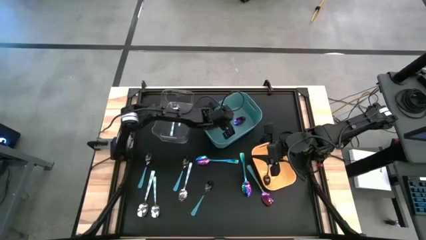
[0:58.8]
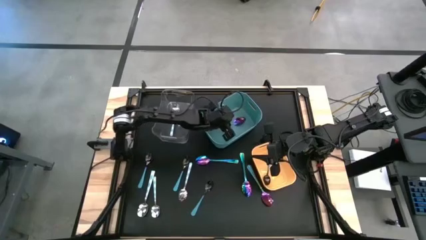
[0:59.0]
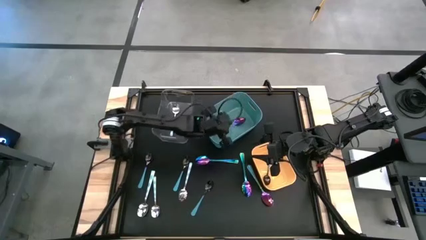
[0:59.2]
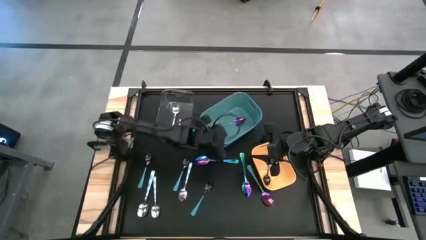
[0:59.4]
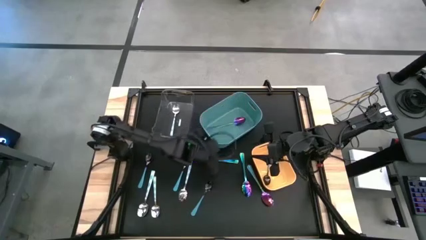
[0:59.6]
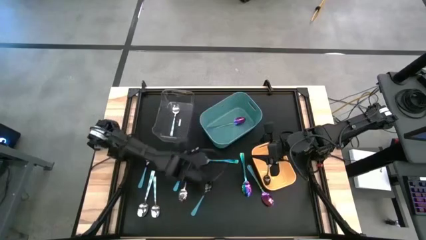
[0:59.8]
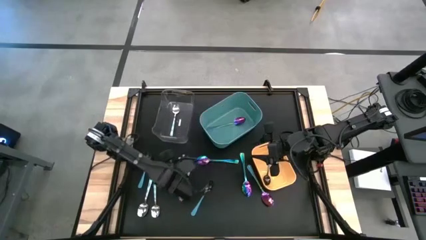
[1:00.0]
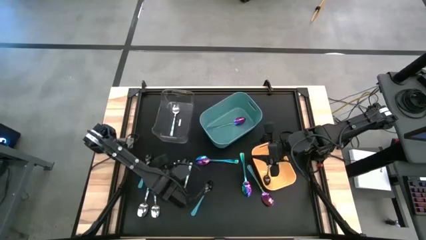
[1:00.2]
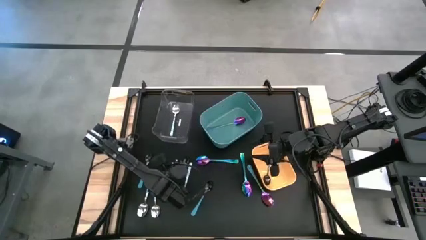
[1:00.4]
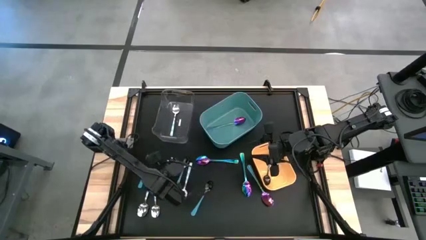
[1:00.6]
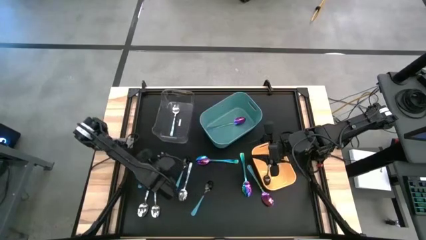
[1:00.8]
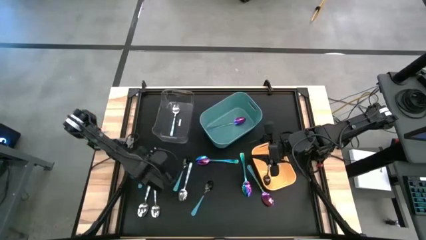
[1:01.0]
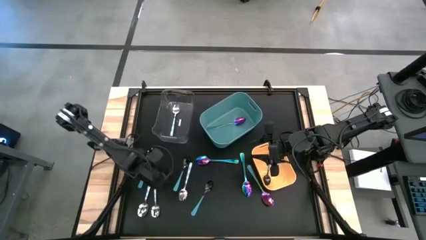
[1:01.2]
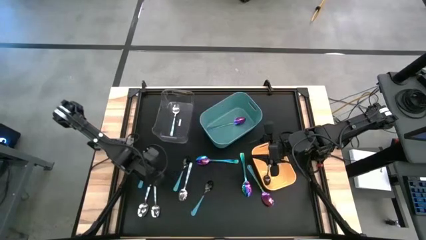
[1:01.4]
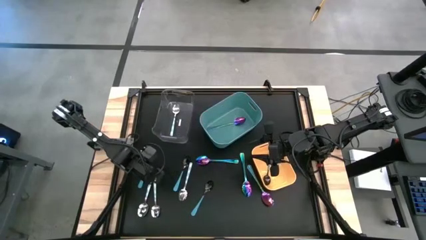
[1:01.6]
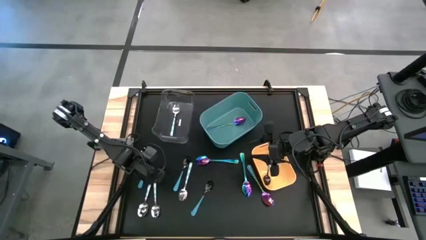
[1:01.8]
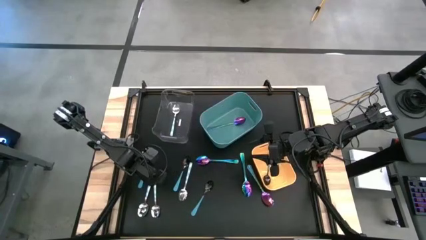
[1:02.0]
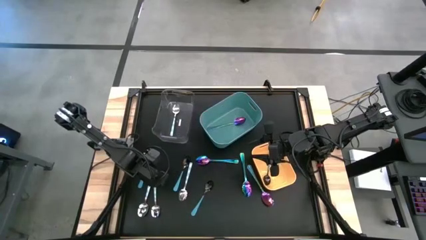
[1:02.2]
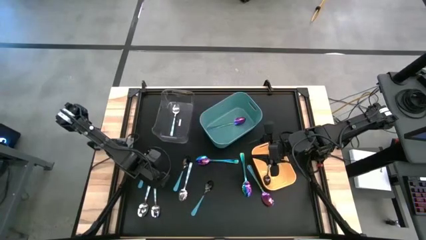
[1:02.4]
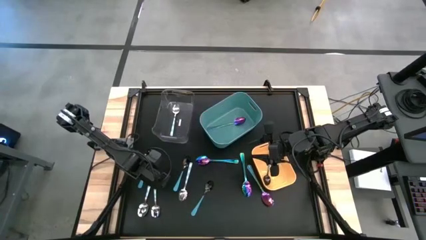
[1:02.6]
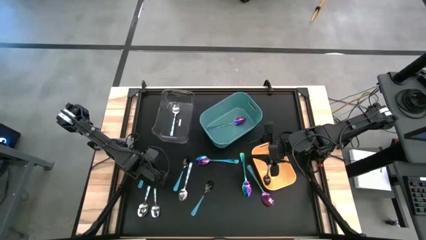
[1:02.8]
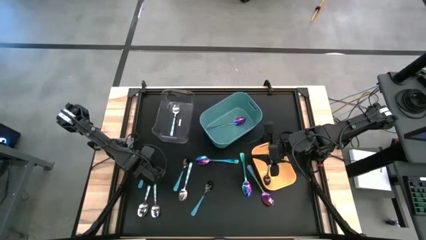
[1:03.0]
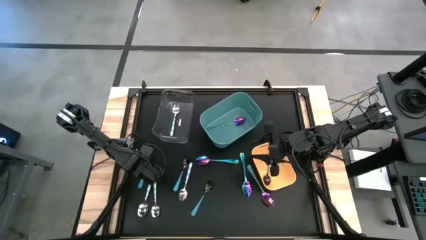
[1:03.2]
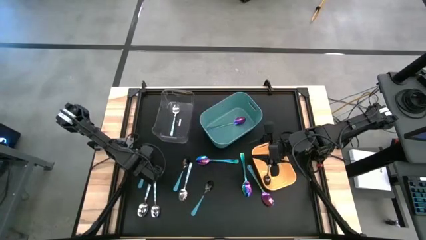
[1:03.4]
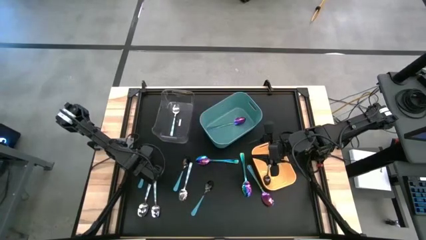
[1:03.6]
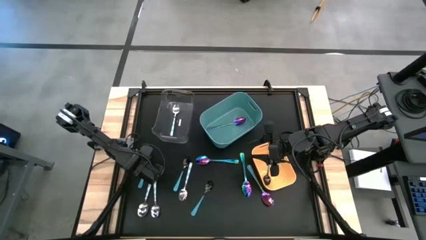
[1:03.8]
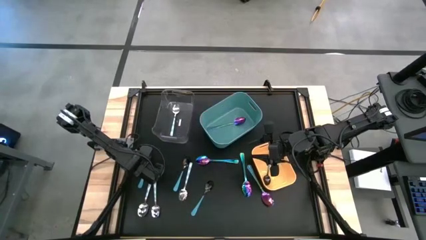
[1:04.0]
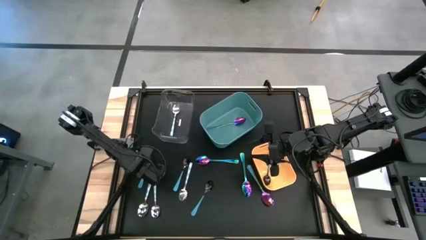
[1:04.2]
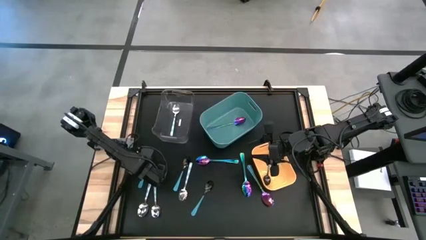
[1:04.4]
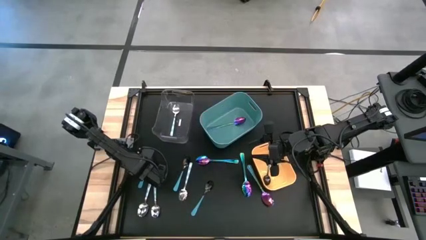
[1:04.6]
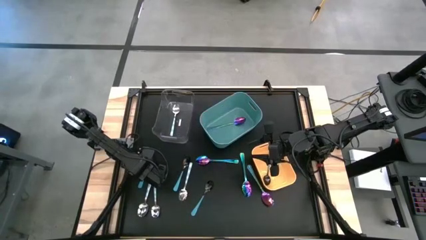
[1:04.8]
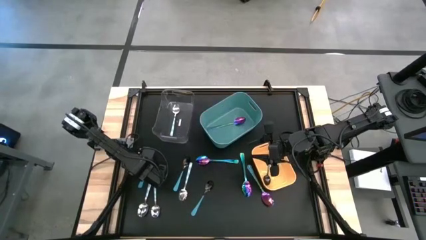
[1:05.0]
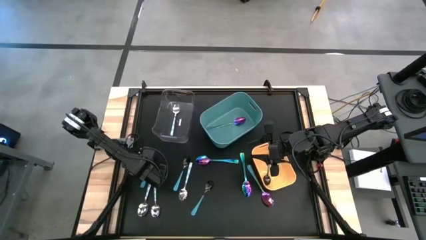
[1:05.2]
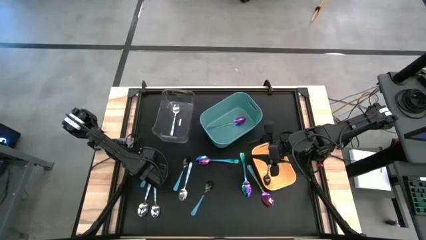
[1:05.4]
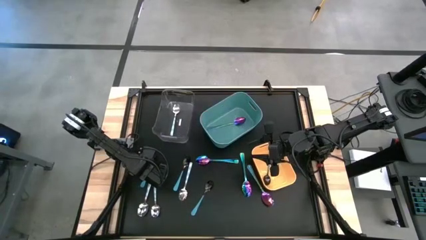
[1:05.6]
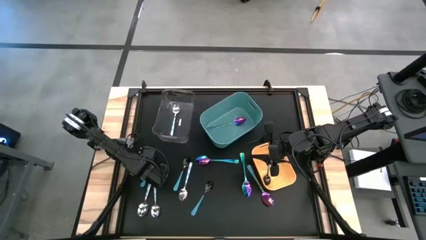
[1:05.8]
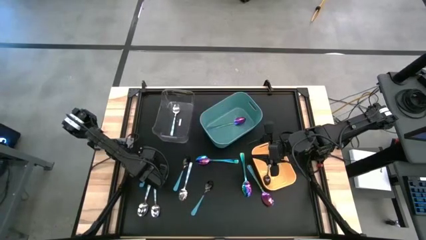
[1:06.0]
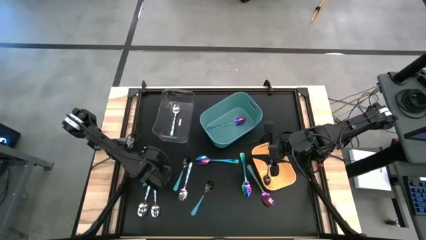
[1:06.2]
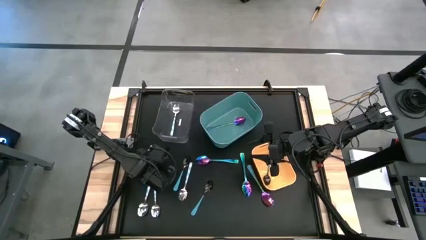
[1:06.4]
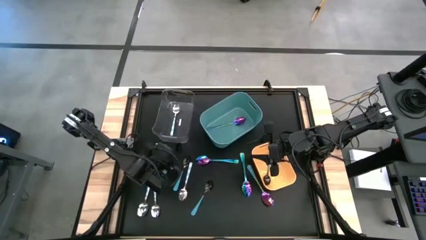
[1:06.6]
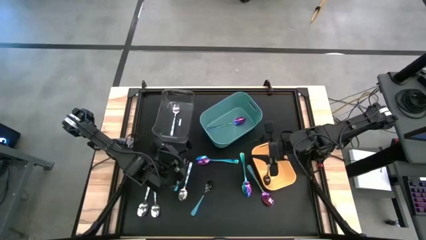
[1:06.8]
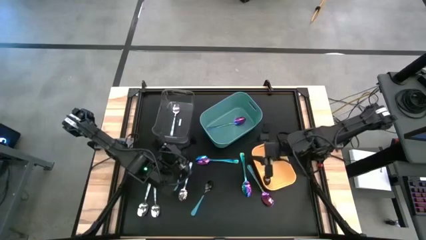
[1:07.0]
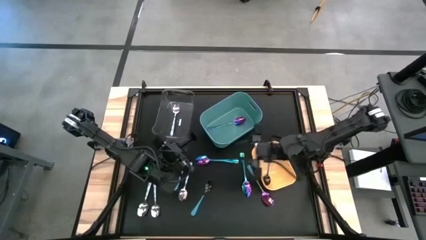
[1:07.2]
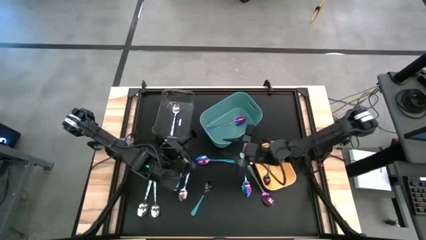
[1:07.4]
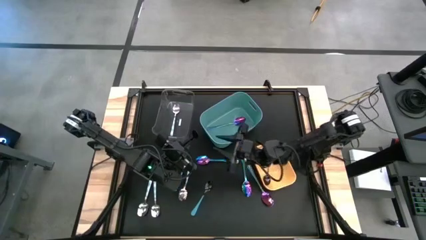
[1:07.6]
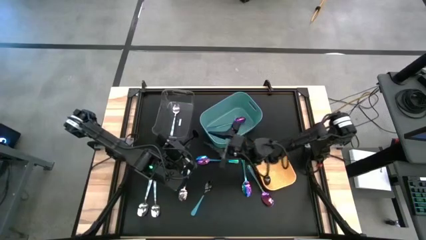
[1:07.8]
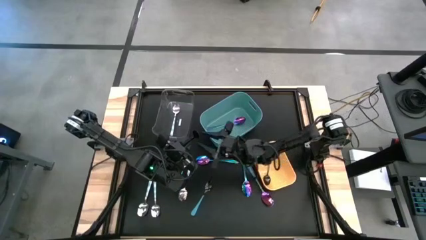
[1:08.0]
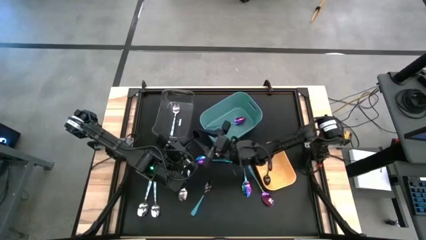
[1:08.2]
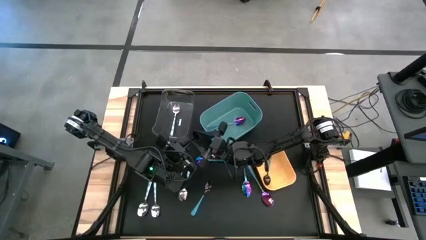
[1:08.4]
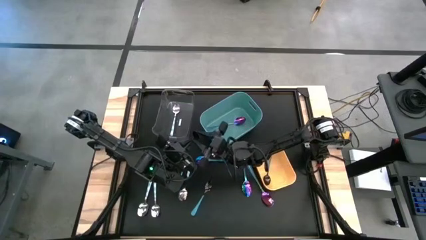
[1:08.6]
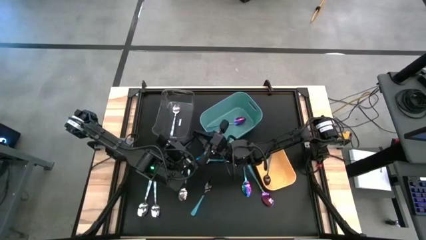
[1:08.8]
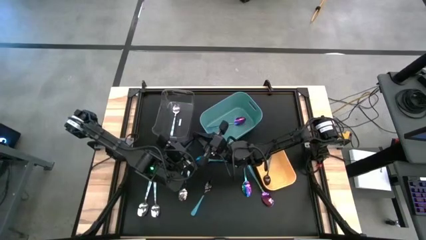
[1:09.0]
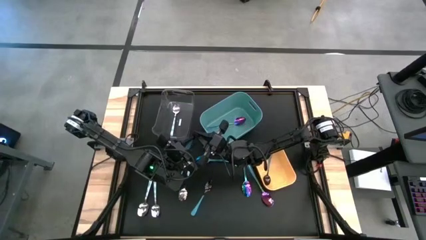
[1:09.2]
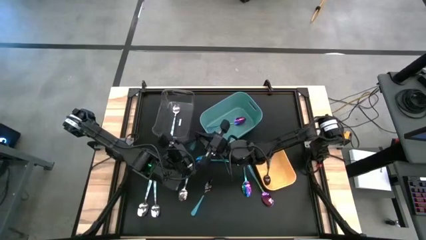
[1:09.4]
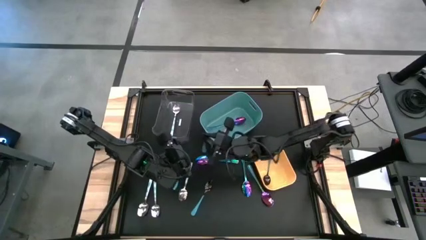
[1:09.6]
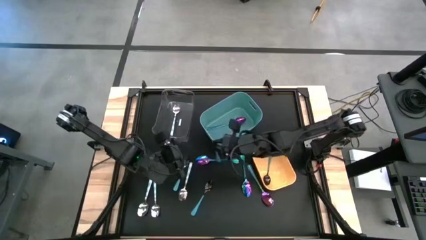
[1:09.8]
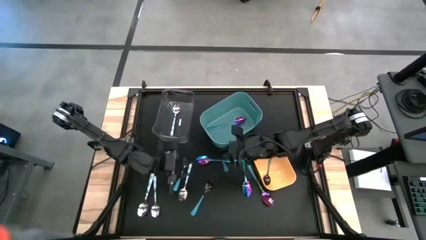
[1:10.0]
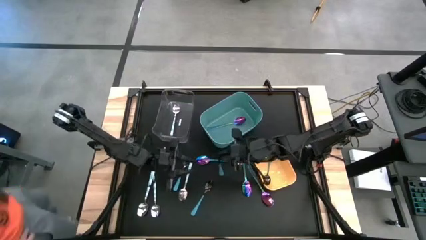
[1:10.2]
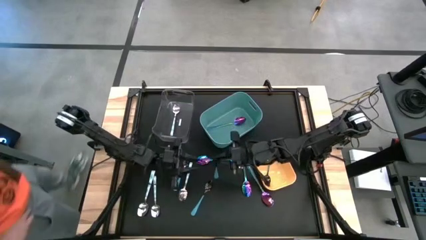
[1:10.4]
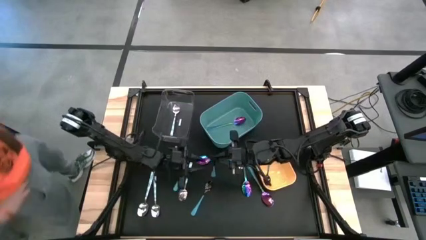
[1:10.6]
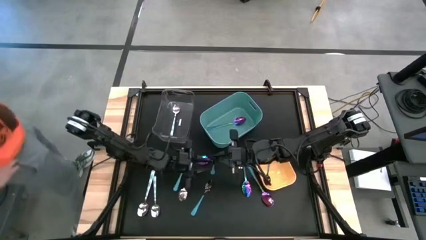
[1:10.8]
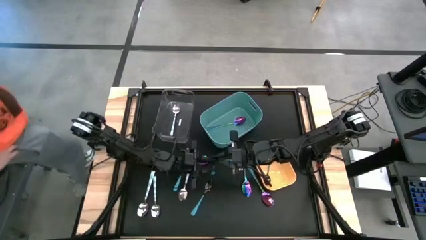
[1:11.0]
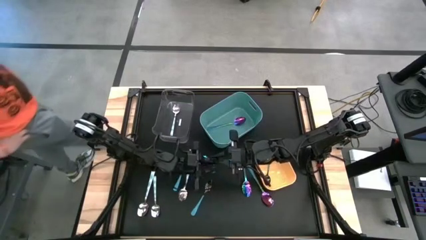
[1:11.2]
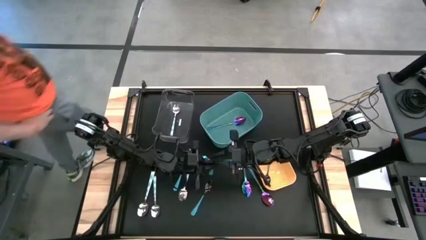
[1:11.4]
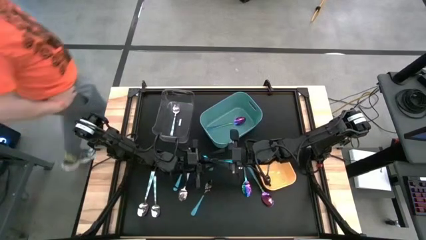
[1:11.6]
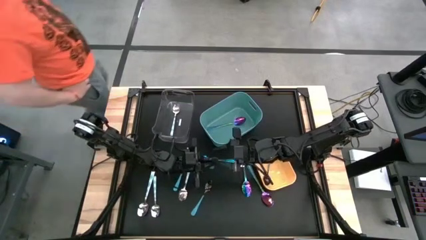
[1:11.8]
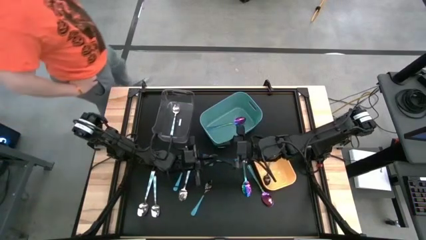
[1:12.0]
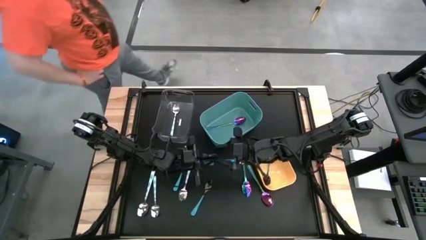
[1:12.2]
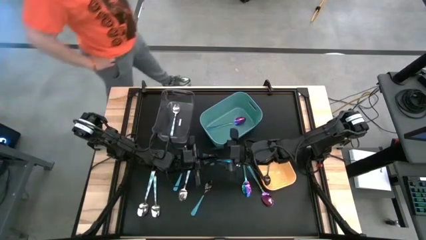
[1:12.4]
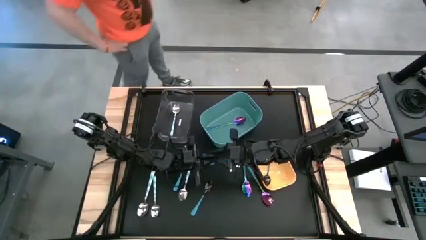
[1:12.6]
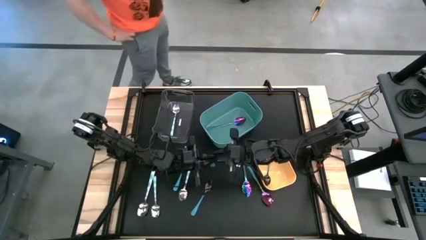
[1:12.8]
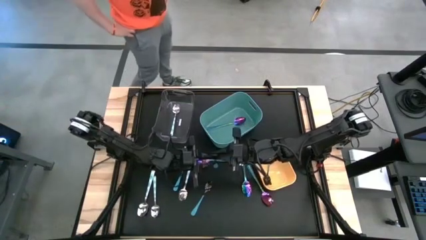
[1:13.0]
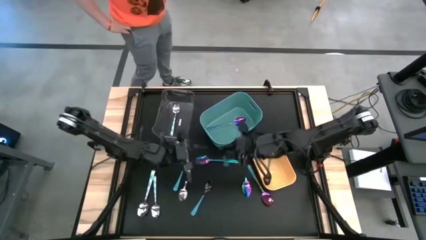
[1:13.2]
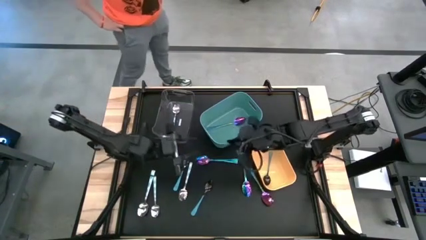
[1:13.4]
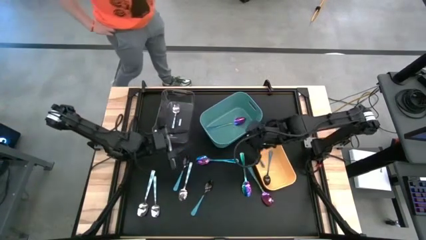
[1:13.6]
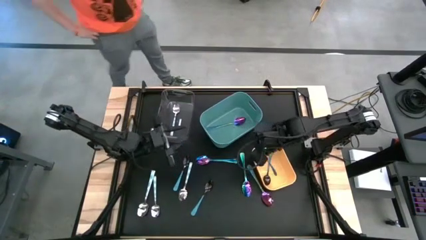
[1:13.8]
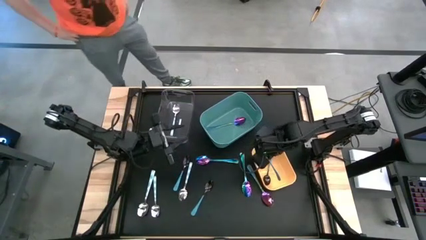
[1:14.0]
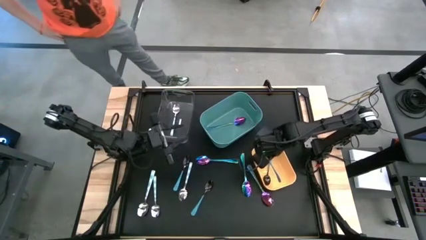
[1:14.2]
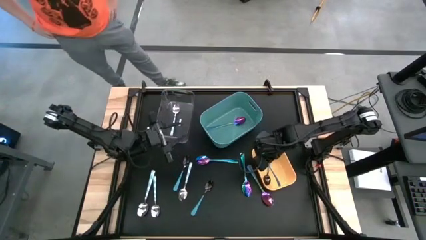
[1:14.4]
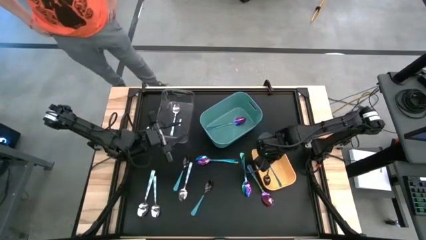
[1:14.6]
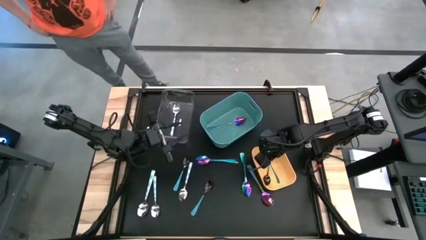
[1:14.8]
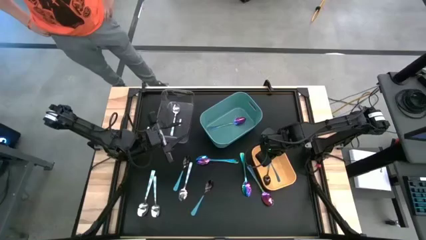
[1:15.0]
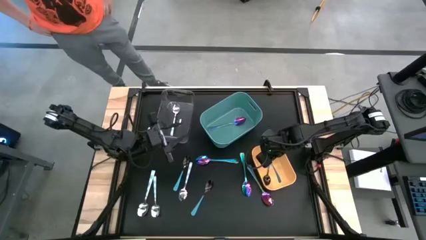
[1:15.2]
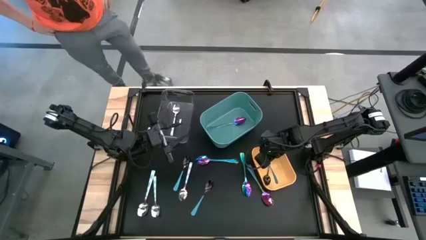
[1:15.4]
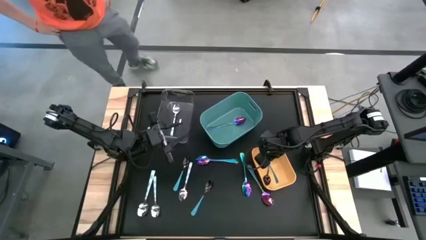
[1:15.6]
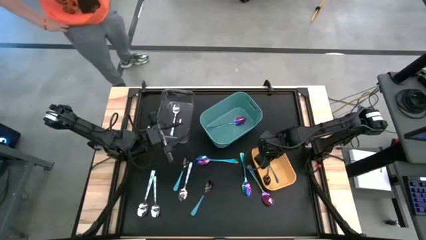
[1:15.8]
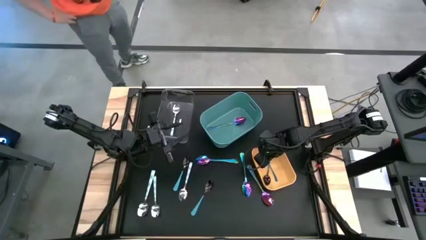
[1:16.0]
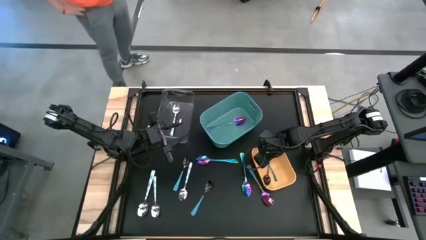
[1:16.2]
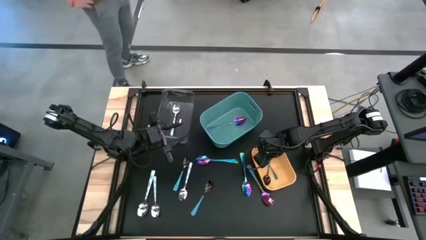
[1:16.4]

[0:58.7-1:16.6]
Task: Sort silverware by color (type)
Put the black spoon into the yellow bin
